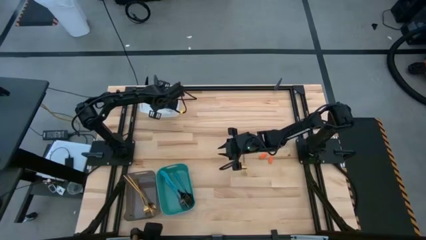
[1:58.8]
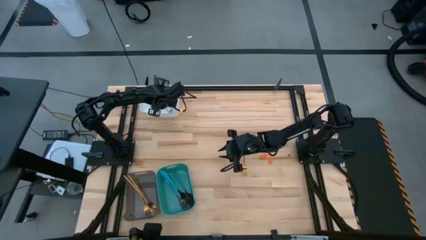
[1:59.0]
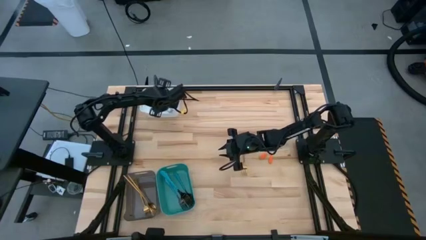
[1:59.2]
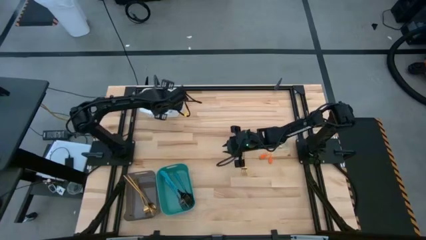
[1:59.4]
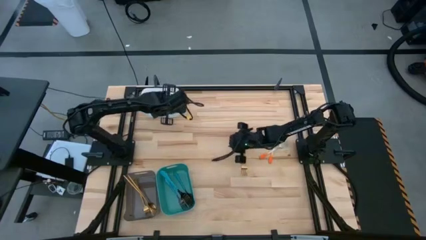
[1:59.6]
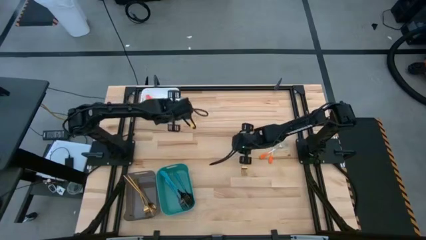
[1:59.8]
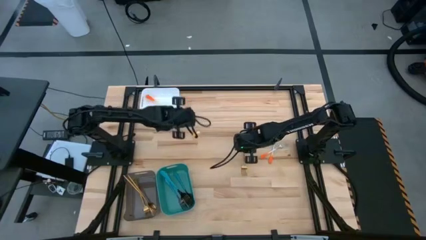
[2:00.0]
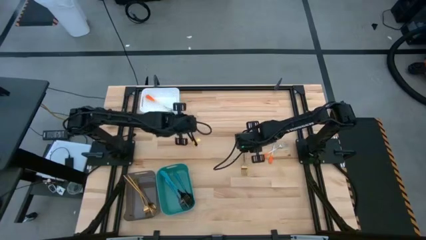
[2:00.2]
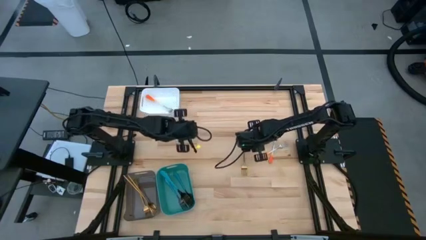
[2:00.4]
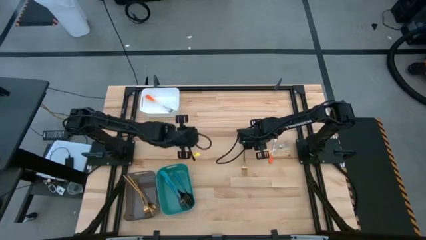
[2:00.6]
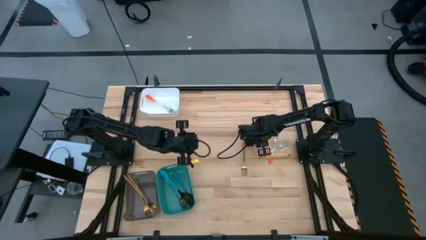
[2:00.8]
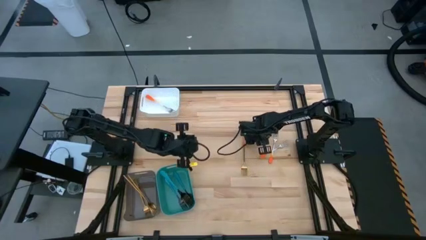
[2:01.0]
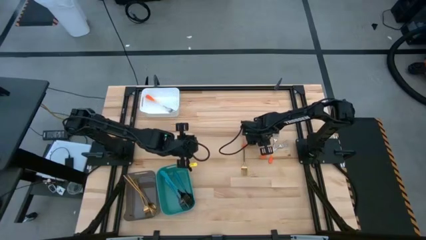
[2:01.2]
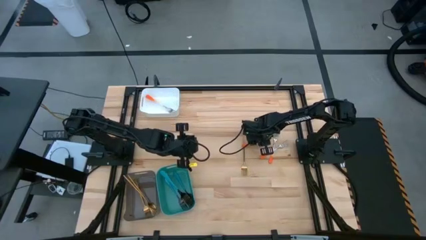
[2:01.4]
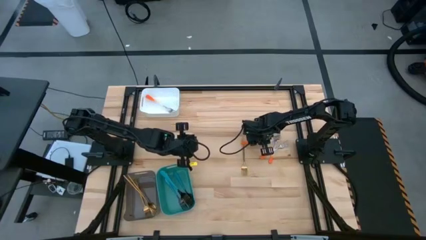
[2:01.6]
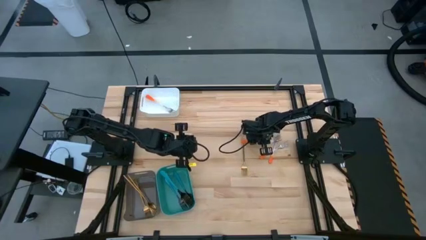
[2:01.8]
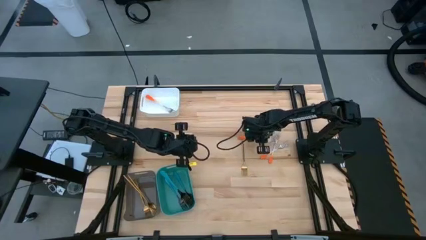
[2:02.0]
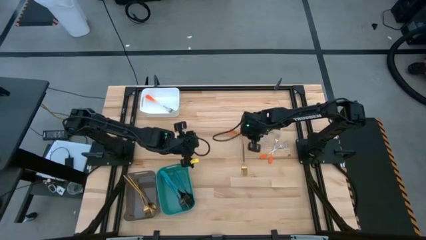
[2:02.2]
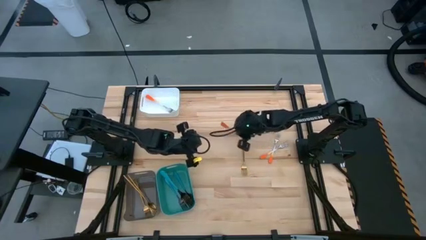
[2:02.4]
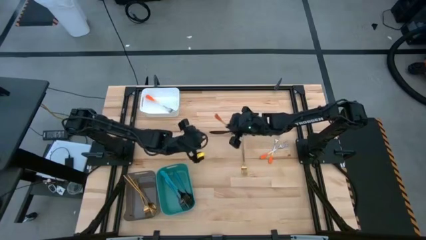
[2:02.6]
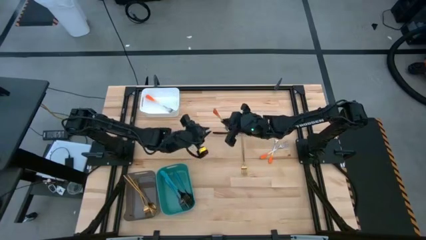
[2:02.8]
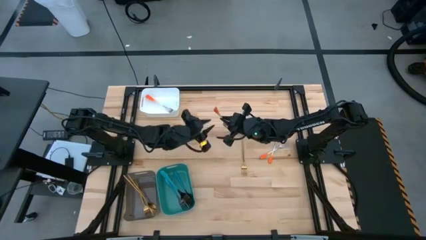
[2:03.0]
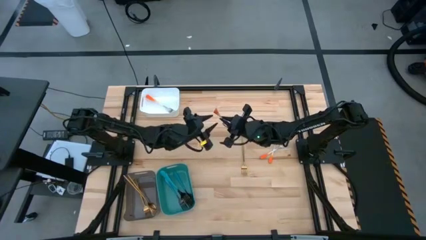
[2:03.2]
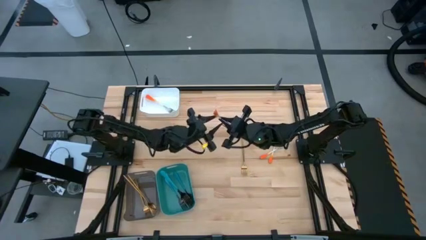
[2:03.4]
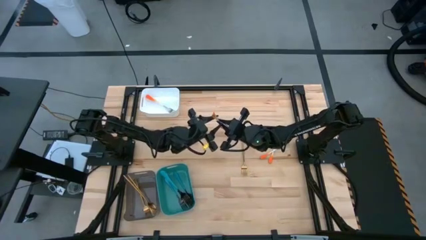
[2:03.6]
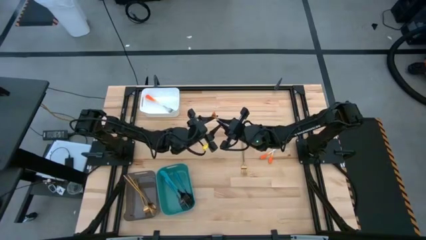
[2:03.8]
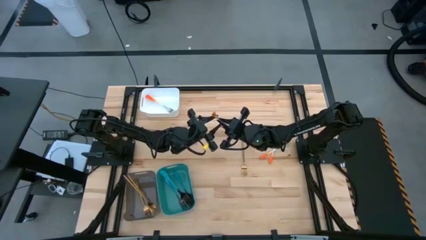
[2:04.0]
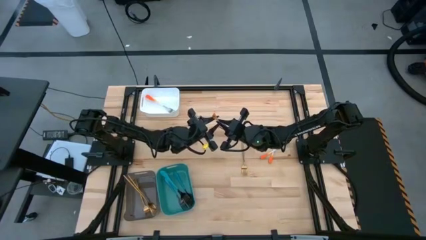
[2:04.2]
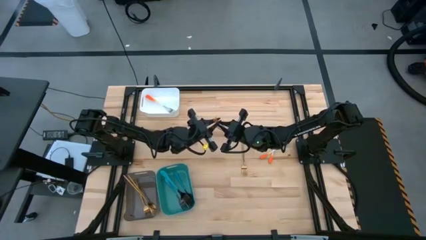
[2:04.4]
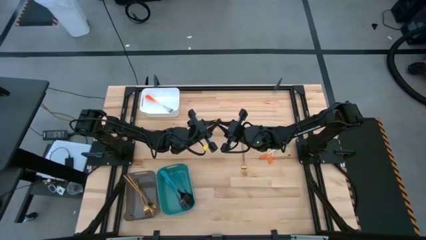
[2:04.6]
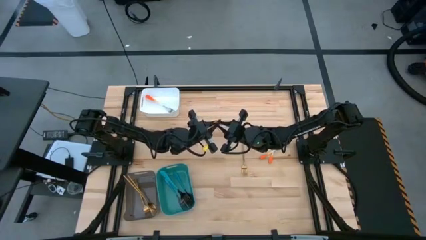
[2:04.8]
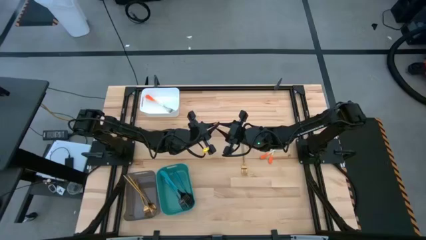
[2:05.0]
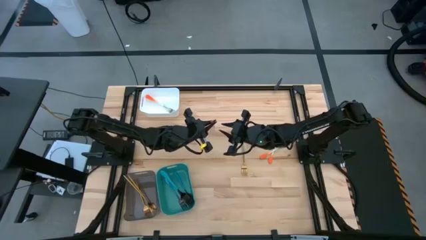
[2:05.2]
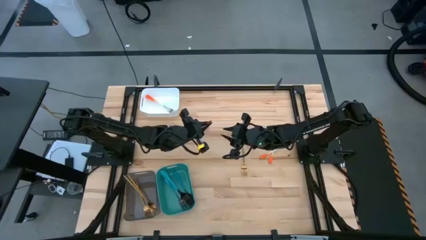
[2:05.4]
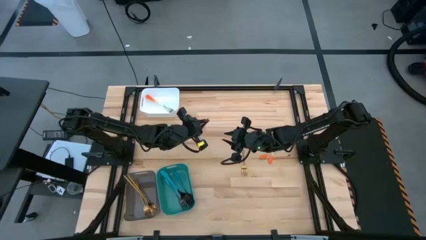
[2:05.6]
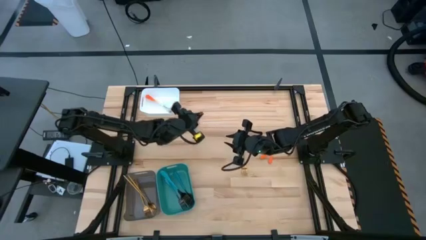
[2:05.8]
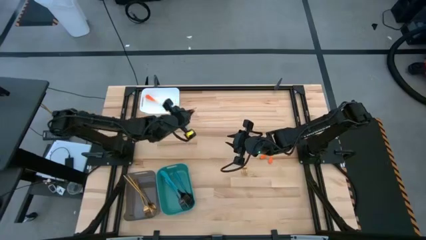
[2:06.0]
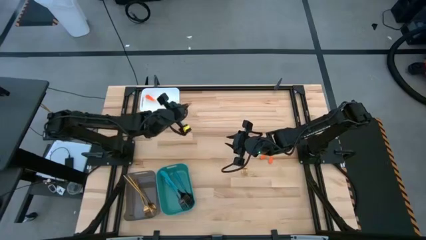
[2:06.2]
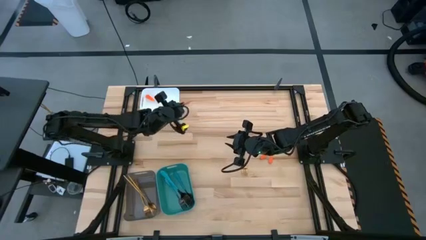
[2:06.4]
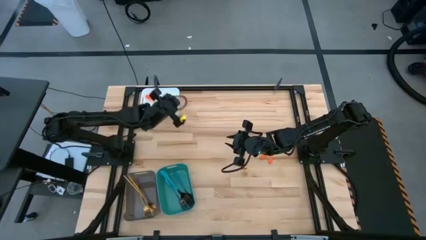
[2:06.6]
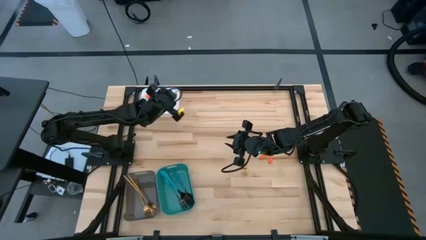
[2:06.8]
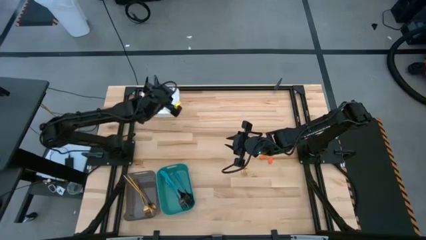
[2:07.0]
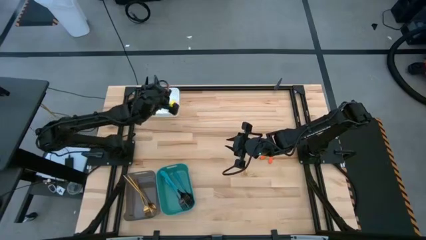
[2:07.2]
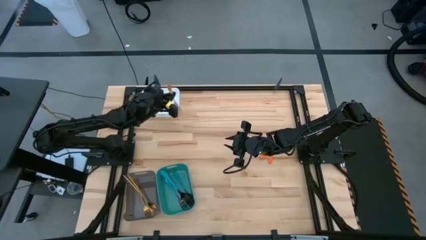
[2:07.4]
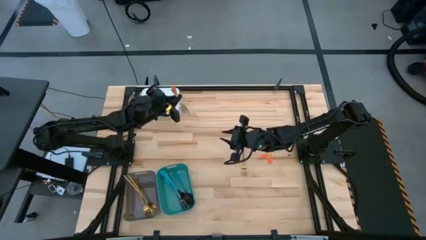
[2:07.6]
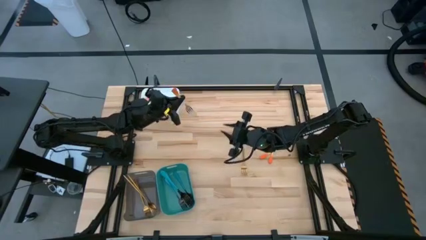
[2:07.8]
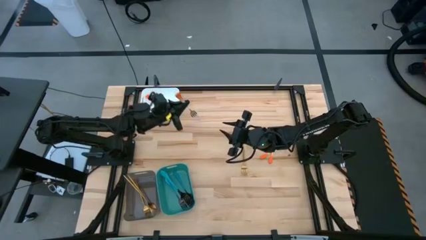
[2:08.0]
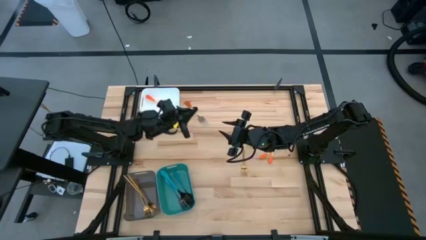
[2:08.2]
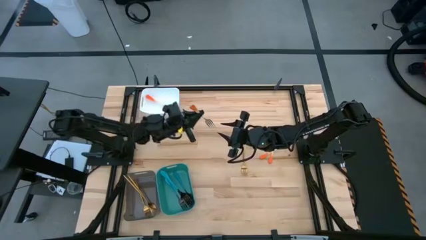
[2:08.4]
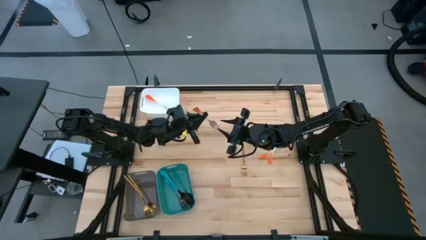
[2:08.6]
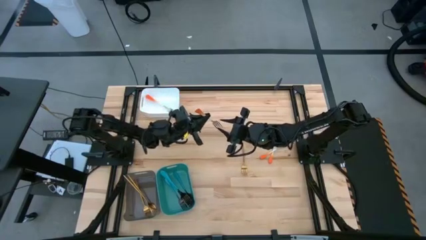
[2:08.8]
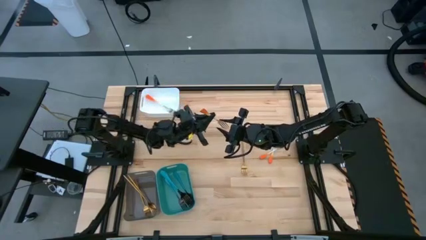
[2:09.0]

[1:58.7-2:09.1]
Task: Sort silverware by color (type)
Put the orange fork into the white bin

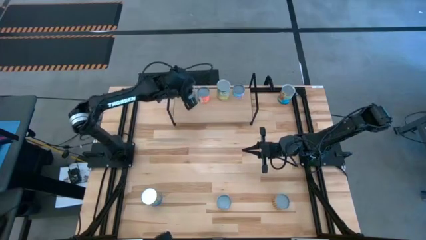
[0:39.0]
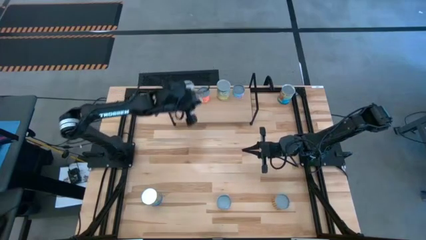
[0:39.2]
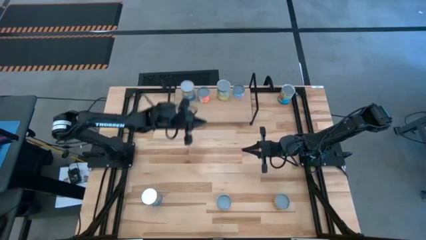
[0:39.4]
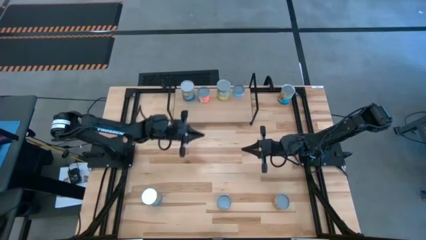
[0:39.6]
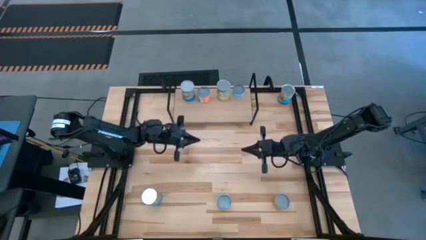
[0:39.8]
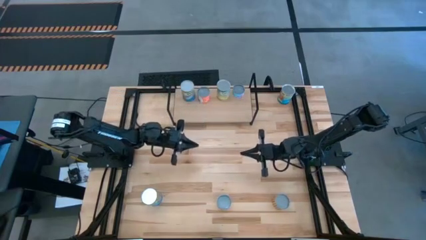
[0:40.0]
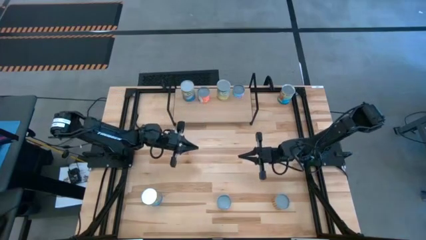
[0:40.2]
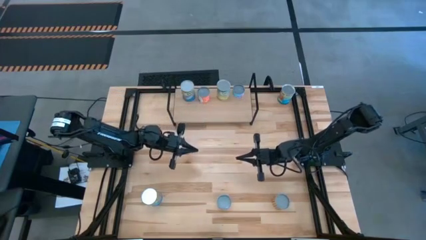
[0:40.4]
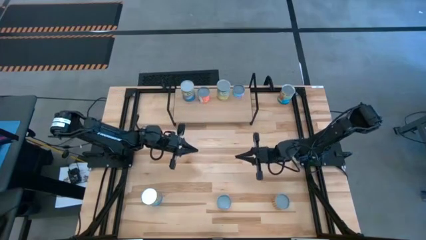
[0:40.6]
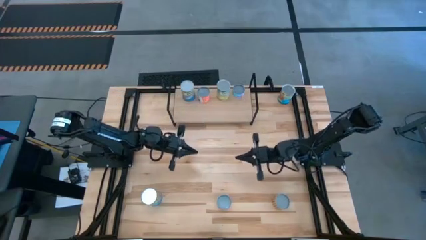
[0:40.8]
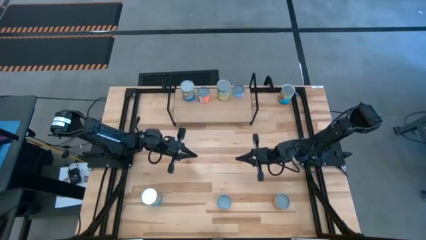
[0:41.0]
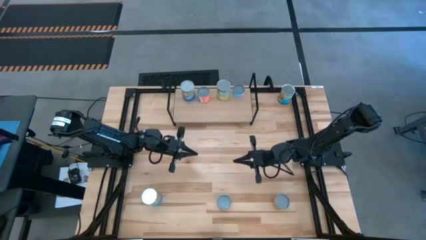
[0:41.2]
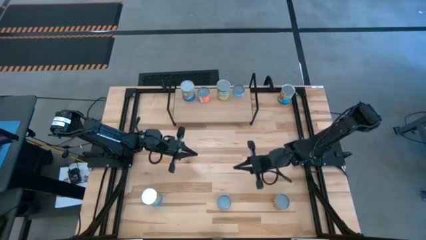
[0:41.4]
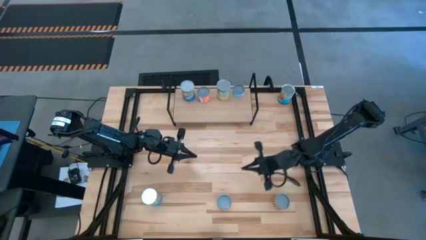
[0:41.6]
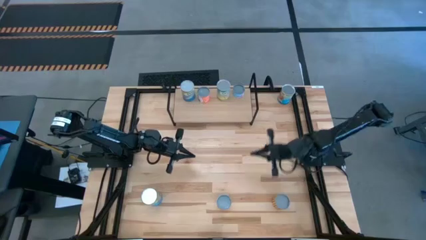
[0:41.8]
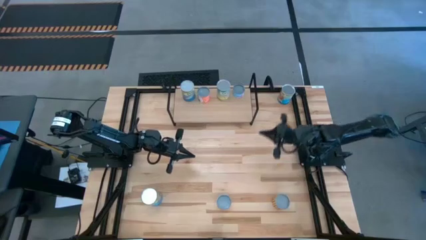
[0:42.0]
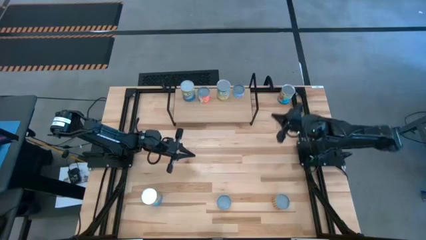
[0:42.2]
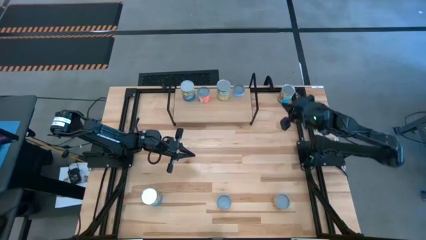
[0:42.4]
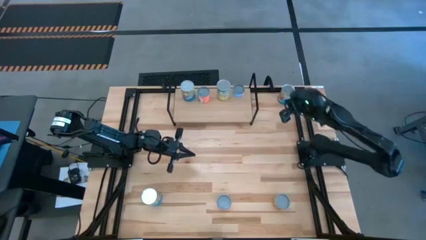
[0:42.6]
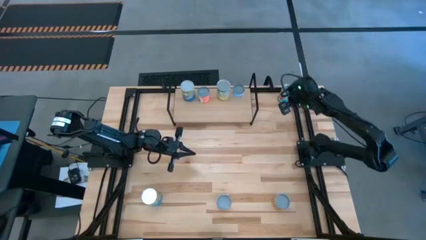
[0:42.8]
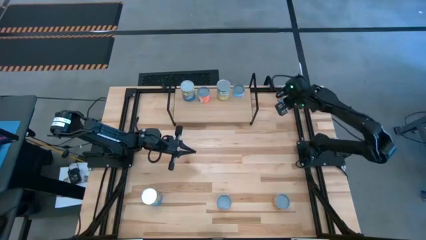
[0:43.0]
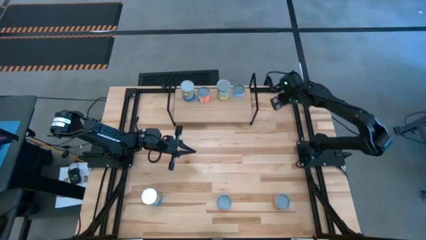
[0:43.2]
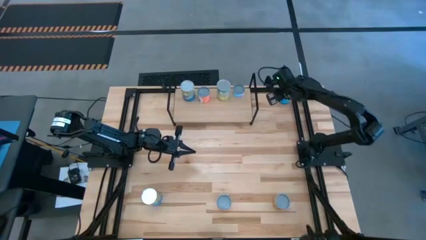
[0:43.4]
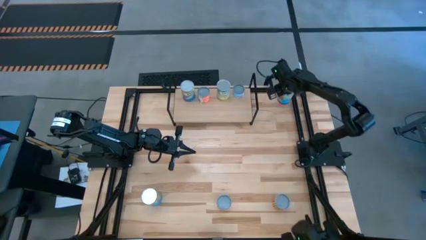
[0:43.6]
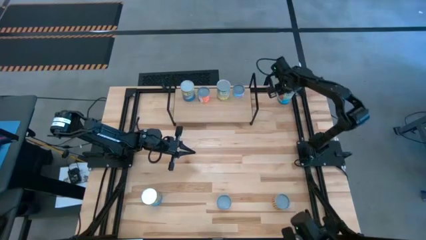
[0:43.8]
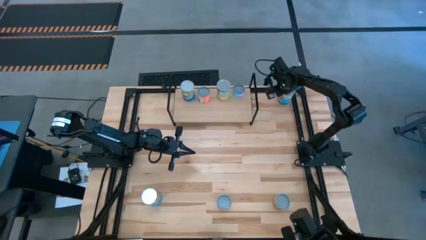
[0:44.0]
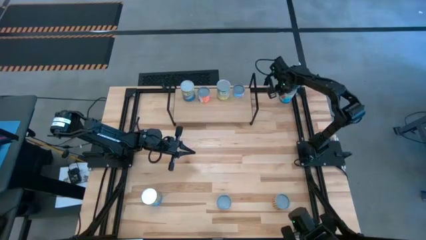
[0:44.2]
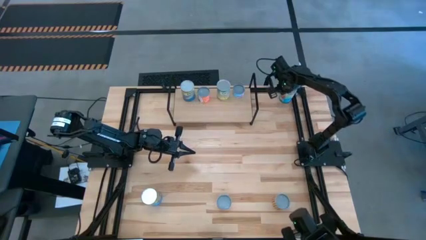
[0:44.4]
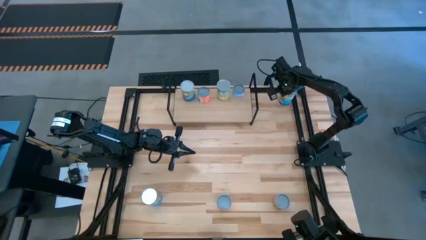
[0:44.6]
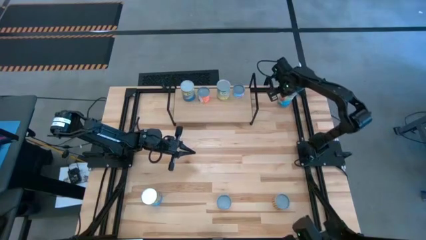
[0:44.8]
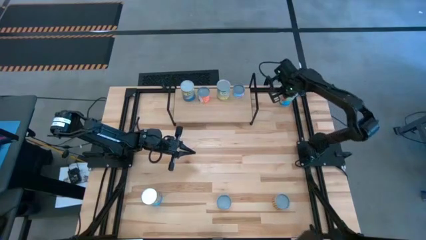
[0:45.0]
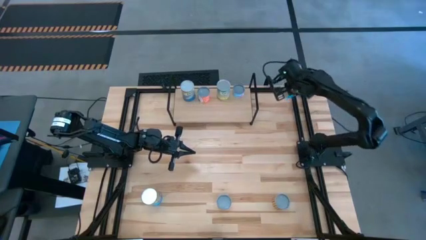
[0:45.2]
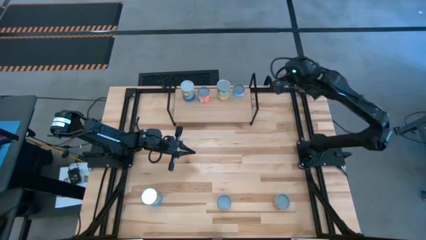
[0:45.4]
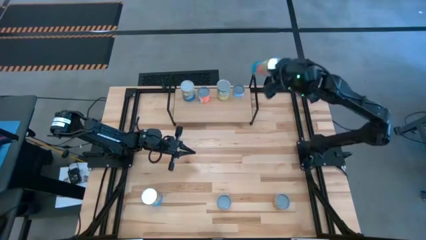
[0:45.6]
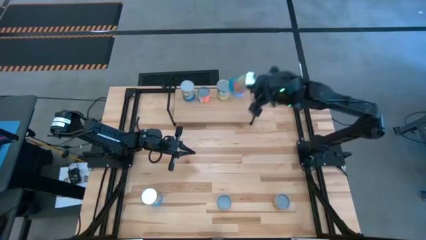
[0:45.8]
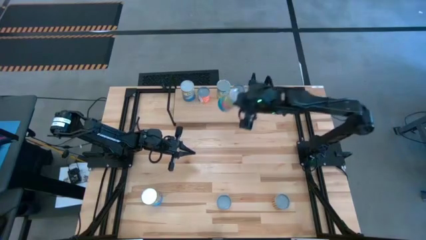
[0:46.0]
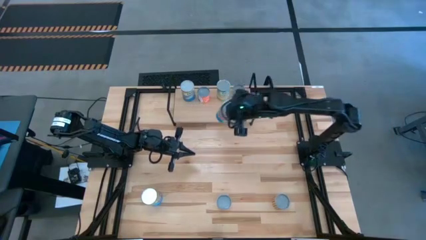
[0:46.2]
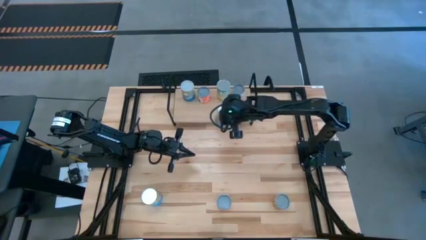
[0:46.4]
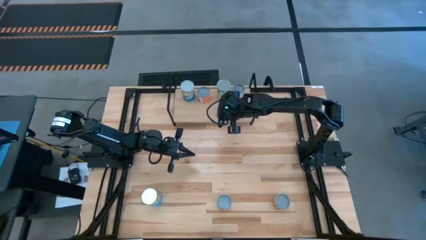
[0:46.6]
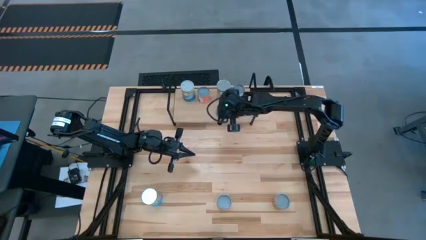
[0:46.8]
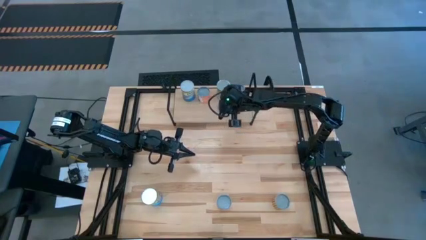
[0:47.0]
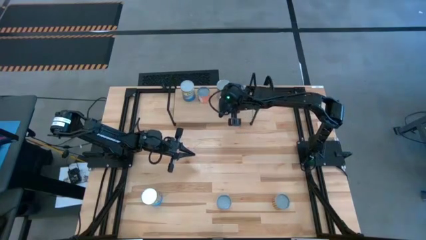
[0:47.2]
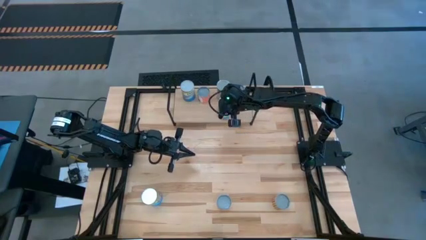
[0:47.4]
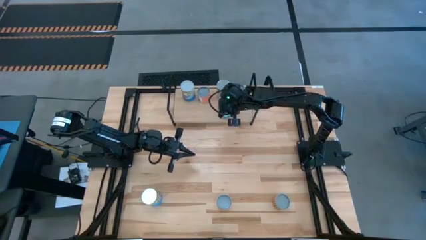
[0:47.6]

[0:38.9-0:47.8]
Task: Pick and place cans onto a shelf
Put the top canned tomatoes on the shelf
